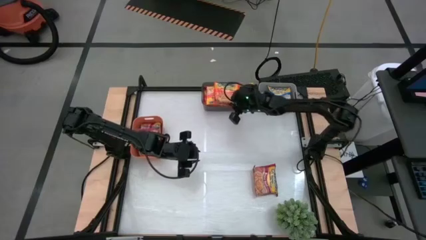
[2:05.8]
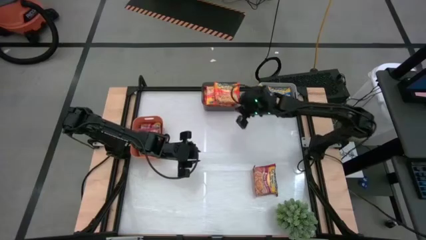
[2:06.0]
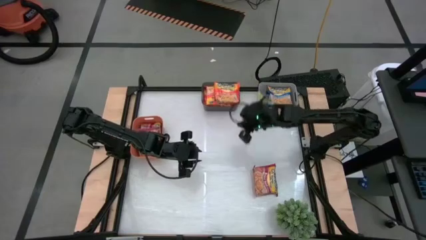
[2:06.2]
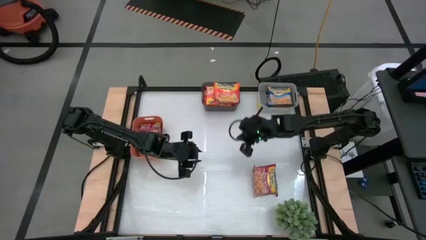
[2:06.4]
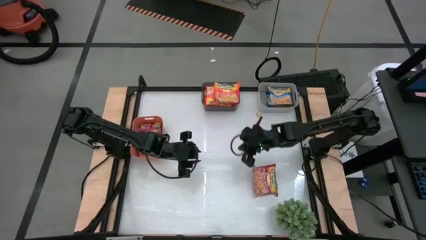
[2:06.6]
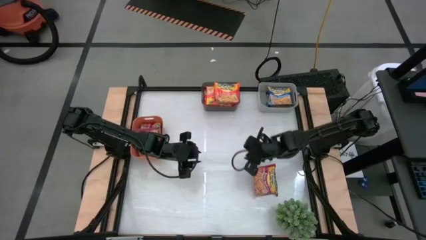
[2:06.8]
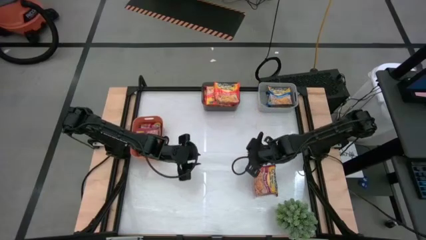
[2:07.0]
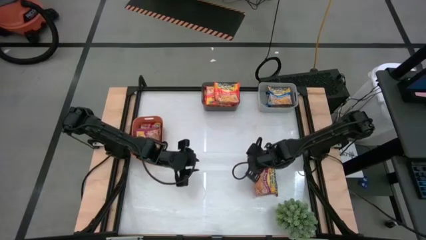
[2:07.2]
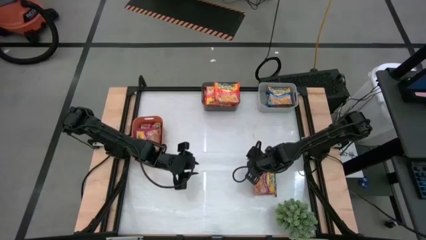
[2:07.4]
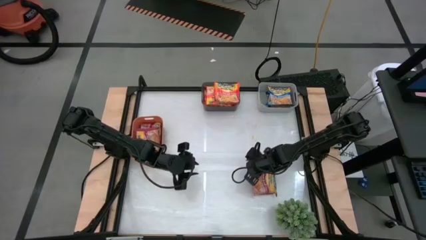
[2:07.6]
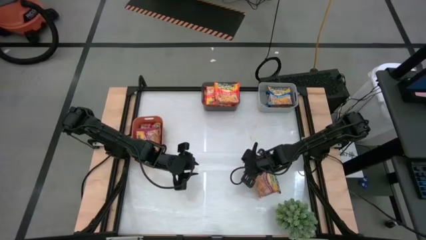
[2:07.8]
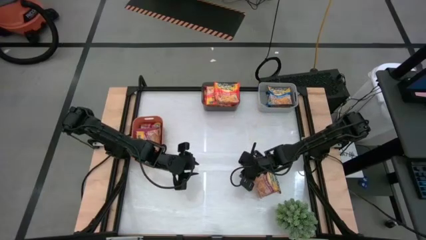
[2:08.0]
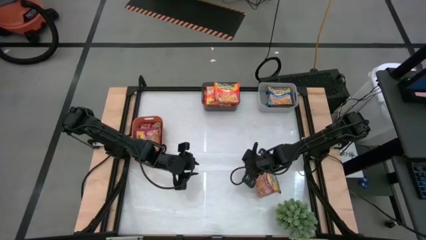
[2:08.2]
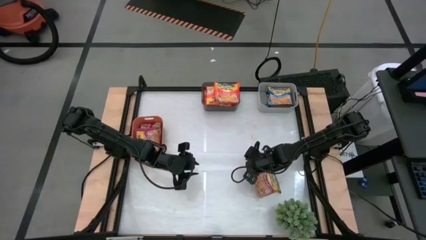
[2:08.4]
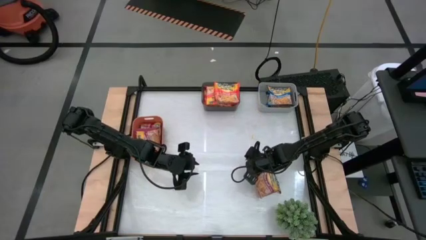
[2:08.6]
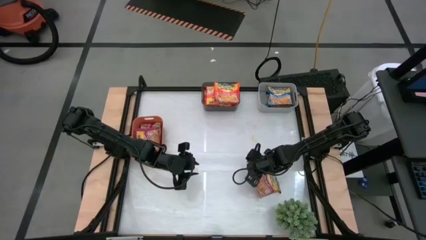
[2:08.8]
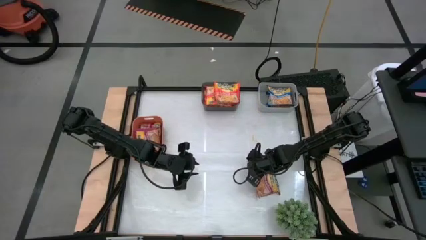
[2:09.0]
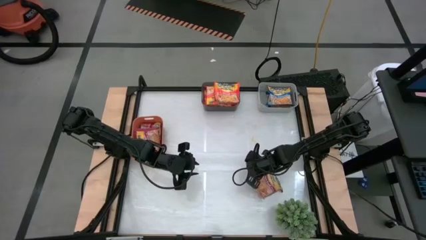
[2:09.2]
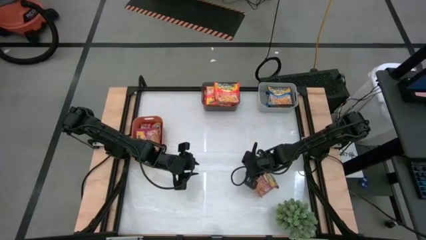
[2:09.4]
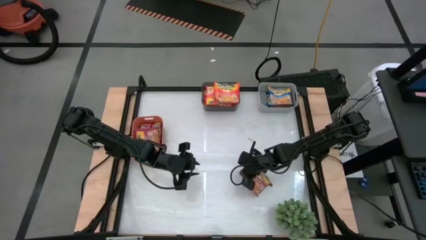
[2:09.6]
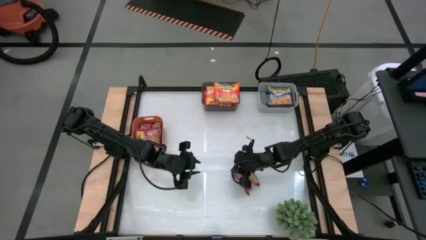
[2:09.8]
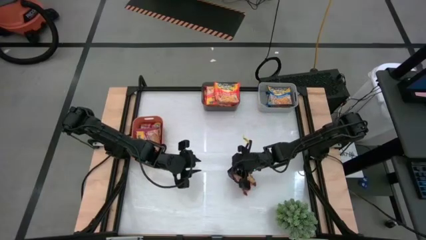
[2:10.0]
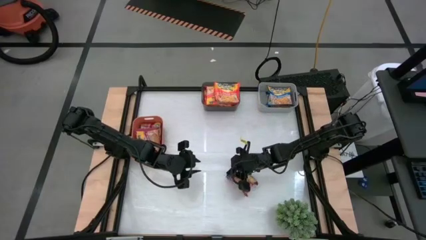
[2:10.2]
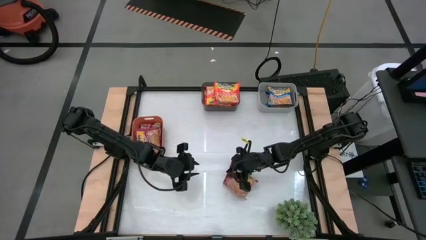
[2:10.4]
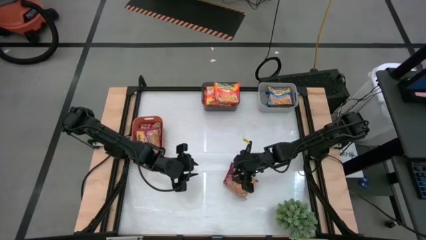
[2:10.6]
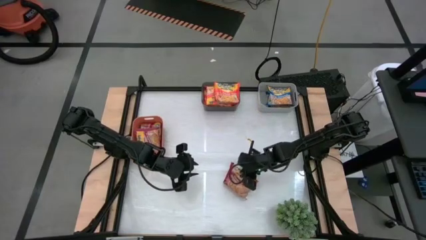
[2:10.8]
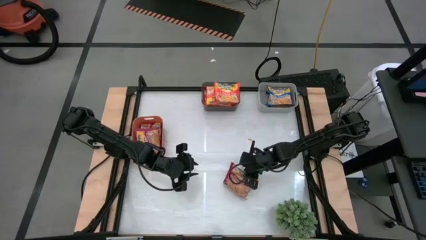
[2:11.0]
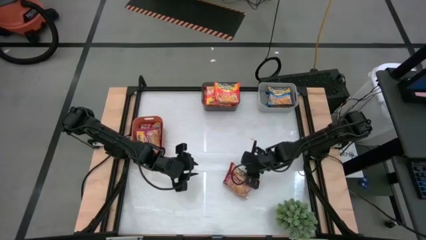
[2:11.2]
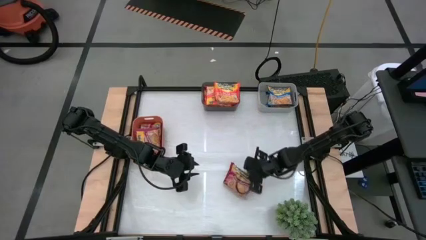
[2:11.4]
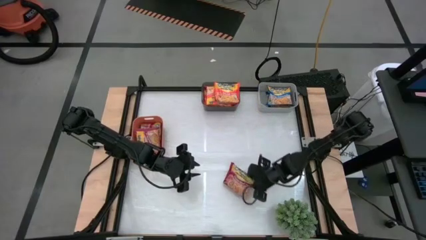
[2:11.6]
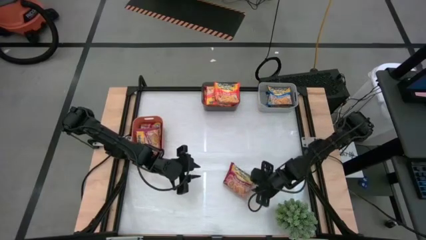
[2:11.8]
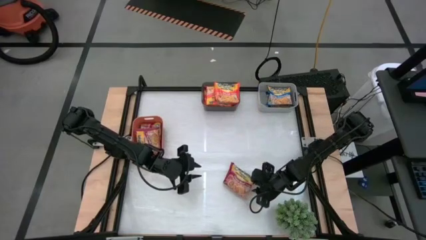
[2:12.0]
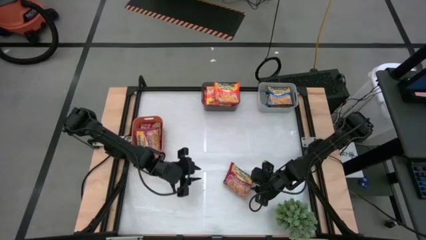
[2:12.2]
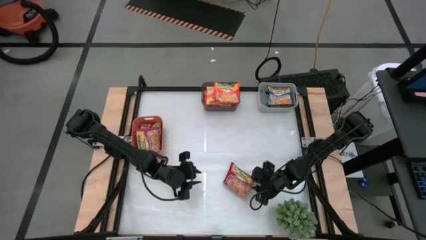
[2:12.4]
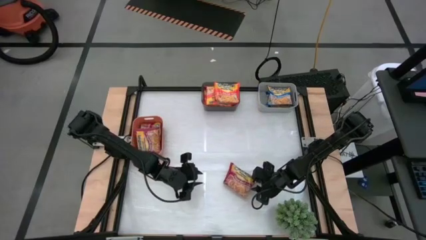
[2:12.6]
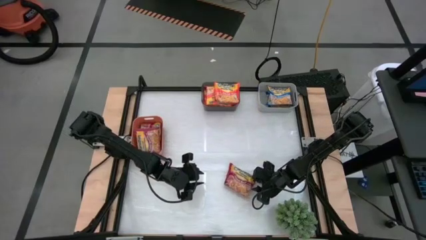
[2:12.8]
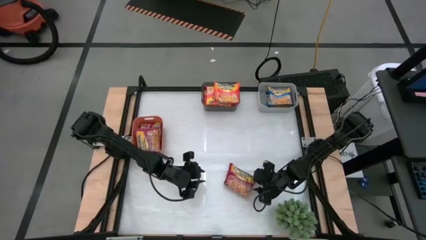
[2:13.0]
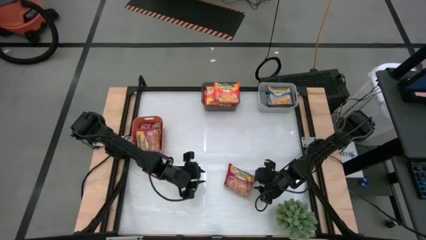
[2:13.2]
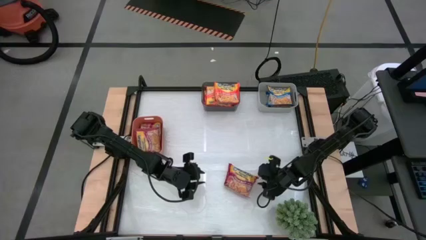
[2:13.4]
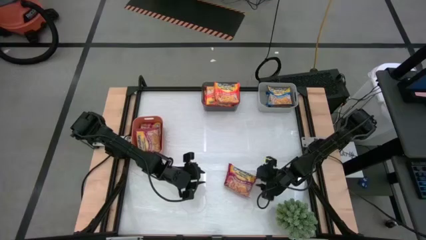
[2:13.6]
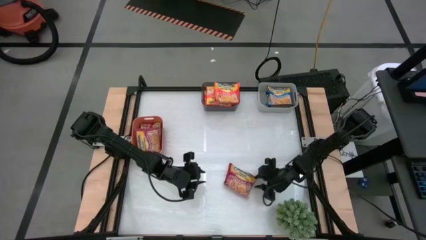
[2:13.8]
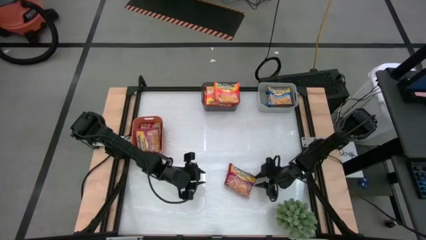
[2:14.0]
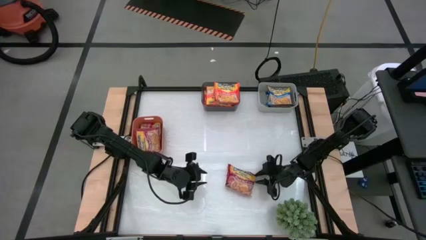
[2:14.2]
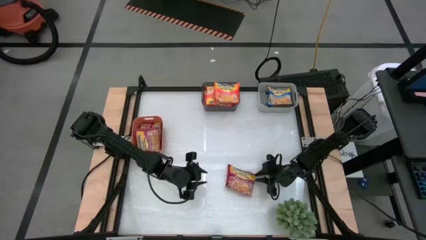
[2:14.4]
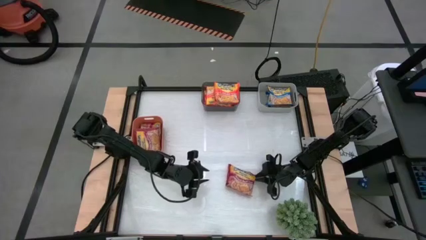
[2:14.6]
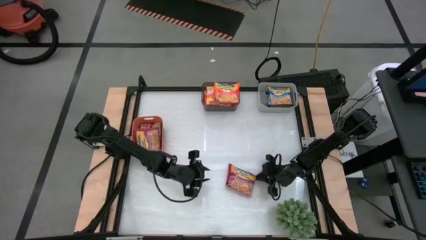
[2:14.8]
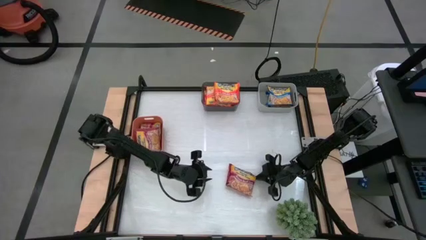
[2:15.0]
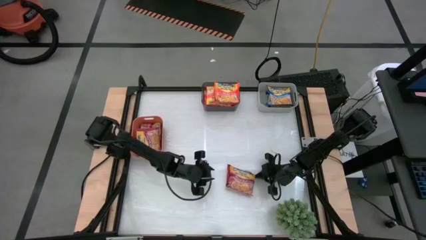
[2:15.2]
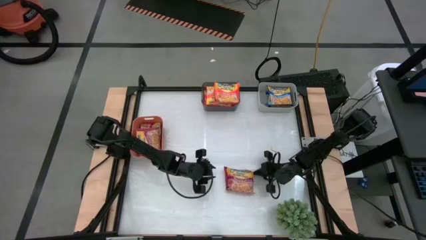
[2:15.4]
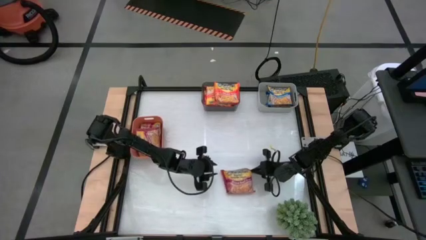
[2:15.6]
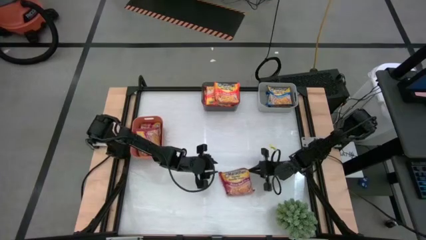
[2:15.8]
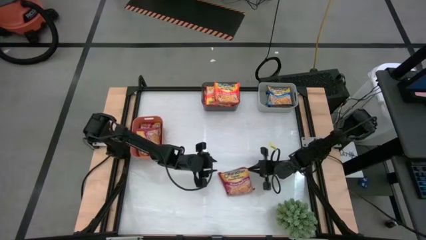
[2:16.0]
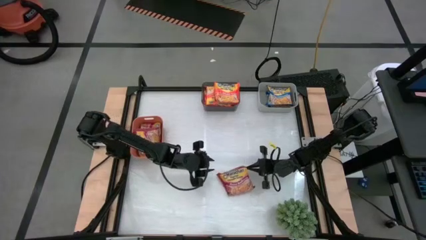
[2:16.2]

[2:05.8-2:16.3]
Task: Sort Maruchan noodles
Put the red noodle pack into the orange bin

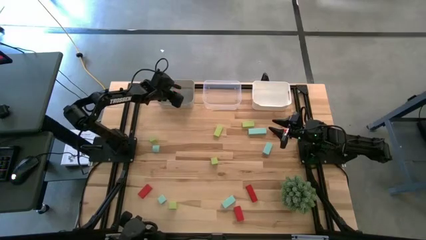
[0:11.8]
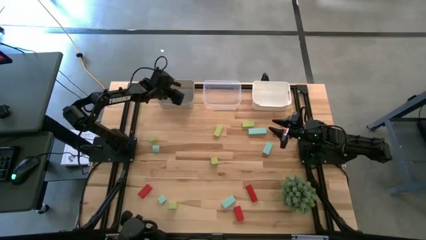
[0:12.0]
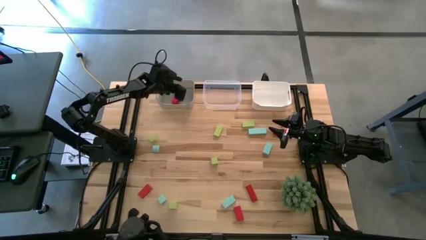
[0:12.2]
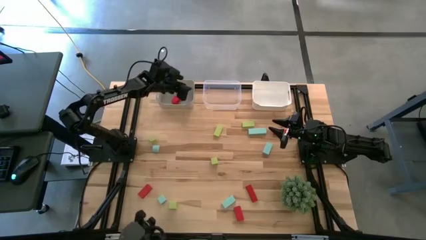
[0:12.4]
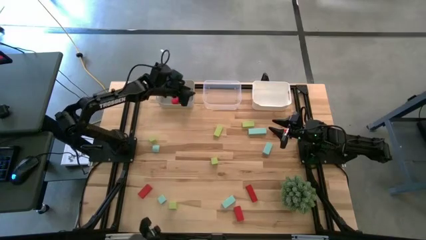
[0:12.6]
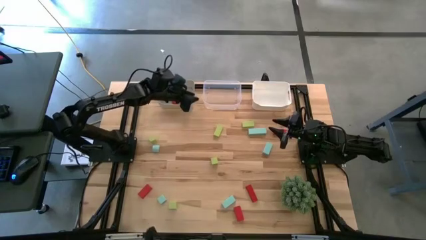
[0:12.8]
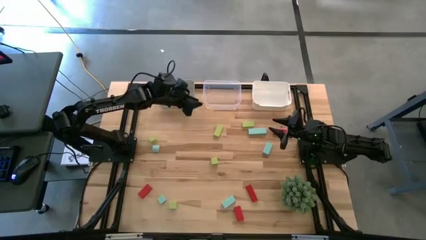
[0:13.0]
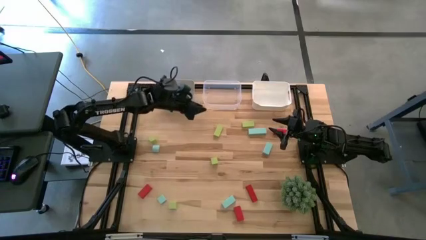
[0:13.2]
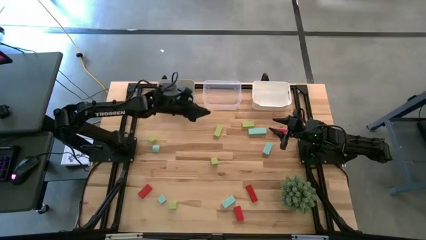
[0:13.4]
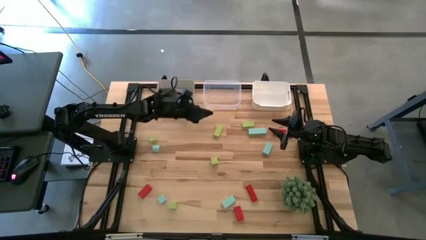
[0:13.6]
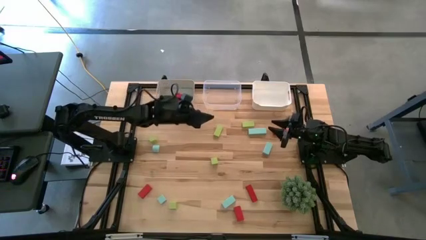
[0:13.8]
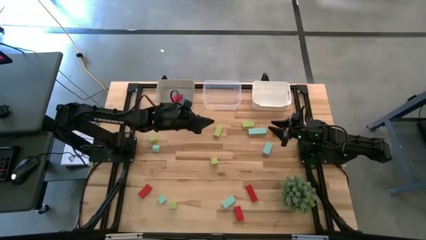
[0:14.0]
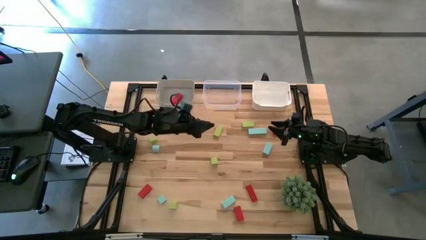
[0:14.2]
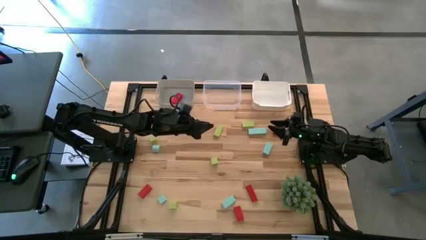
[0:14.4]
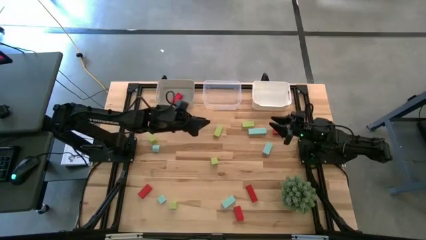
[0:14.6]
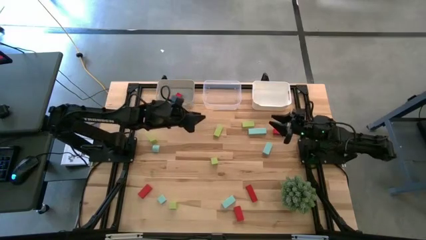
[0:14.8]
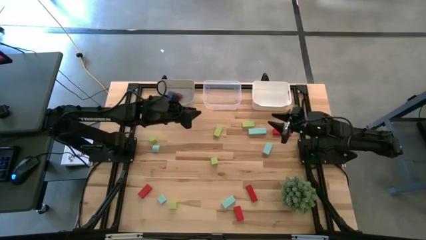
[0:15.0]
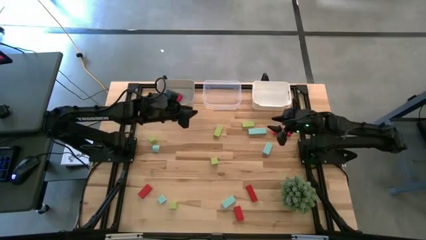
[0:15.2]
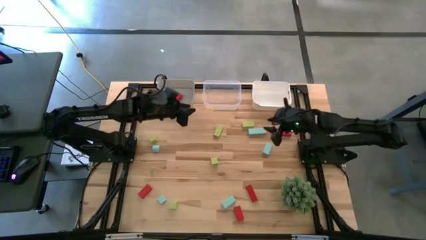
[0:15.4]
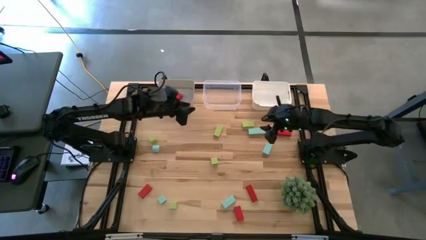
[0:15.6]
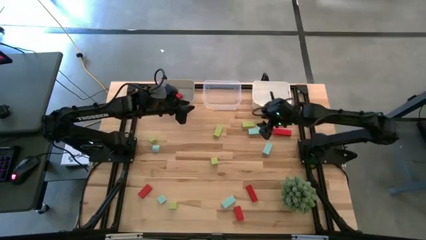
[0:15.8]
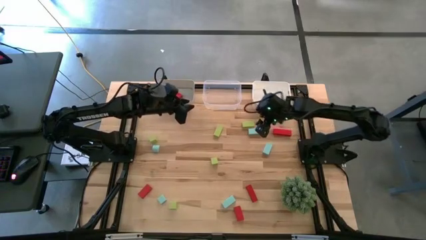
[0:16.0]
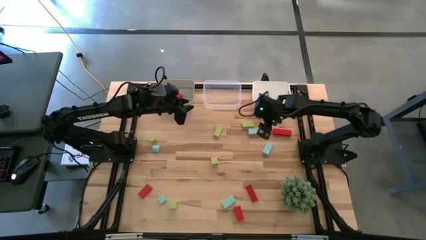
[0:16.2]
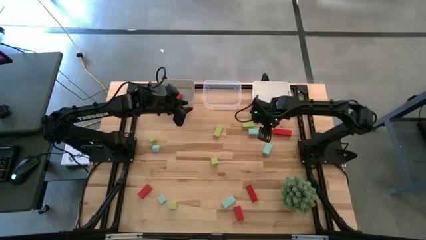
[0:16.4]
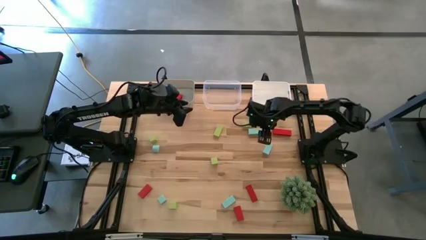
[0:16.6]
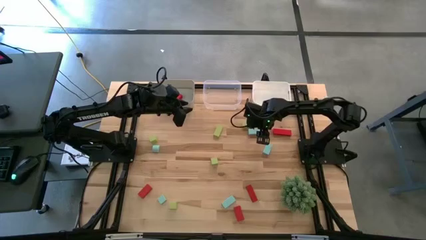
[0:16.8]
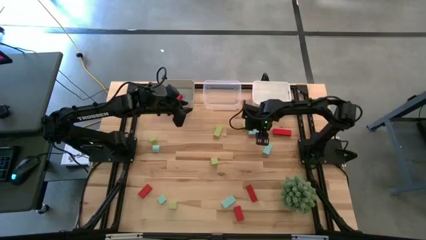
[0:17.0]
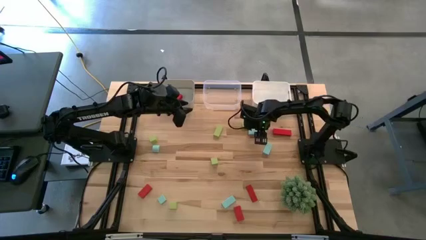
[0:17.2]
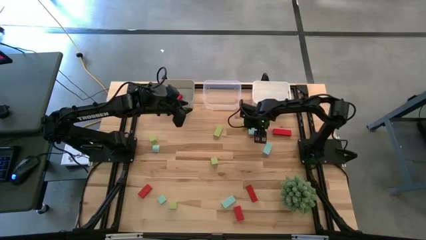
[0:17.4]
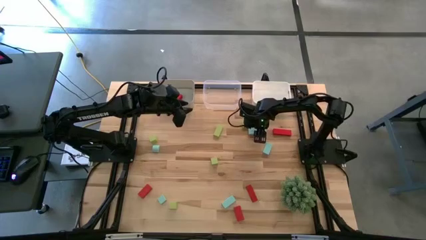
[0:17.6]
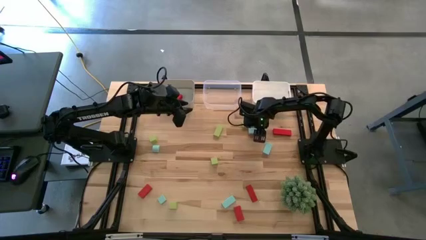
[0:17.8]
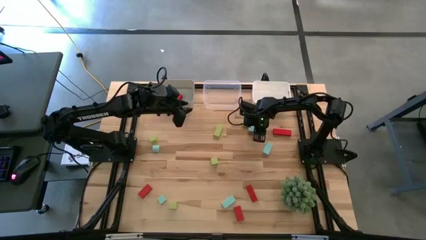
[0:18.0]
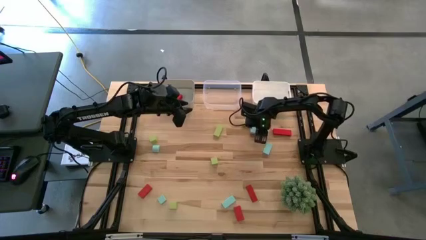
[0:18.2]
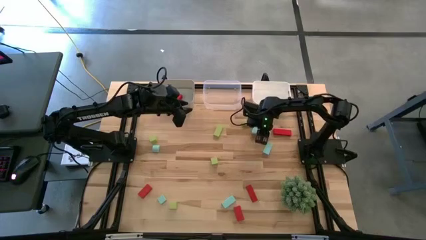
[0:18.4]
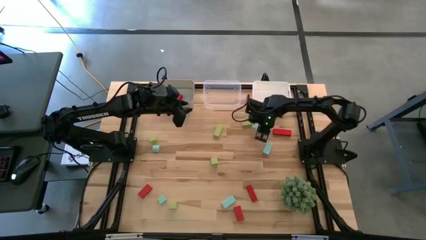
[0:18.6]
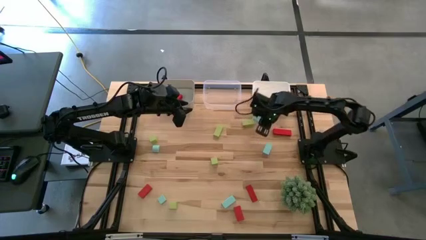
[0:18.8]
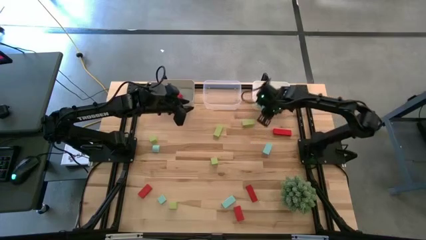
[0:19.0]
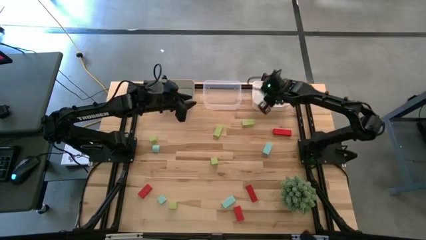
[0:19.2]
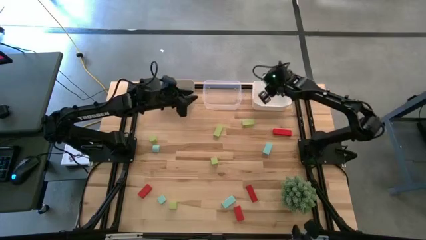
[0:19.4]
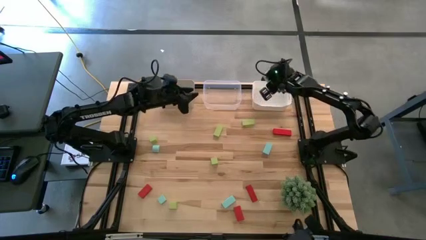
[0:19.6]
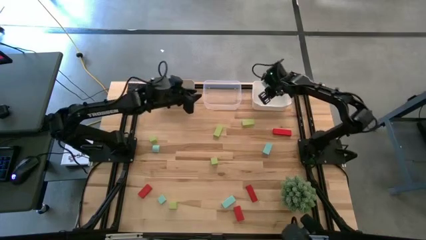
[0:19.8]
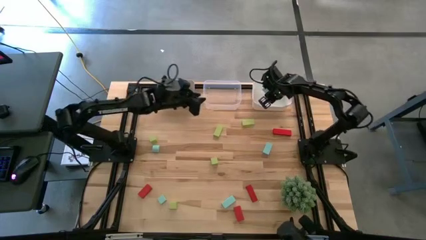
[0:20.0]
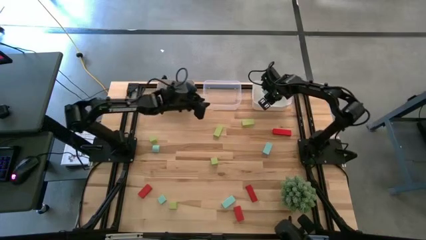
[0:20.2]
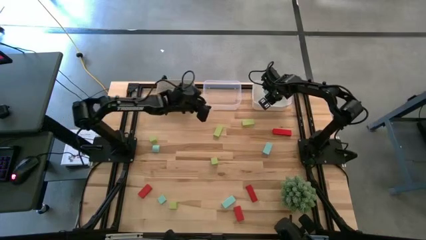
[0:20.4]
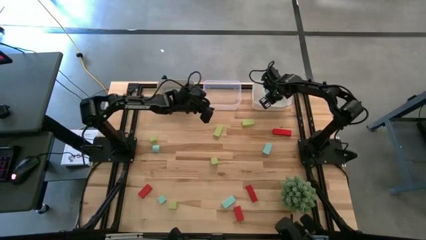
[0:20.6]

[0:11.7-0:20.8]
Task: Sort & place blocks by color
Put the blue block into the white bin
